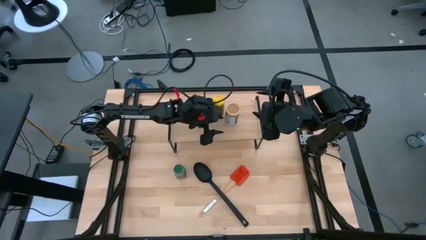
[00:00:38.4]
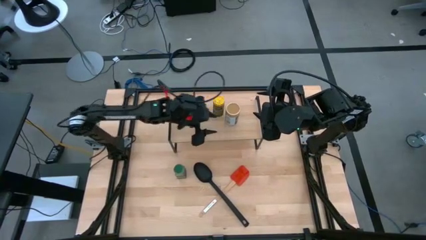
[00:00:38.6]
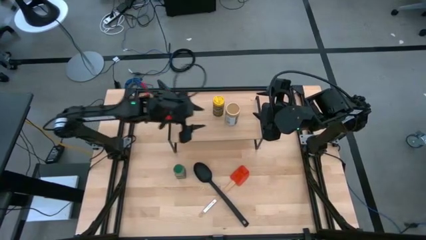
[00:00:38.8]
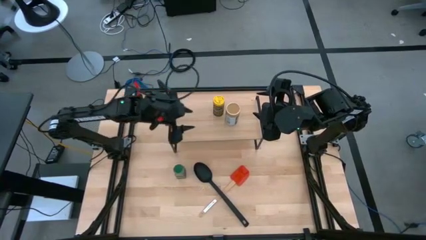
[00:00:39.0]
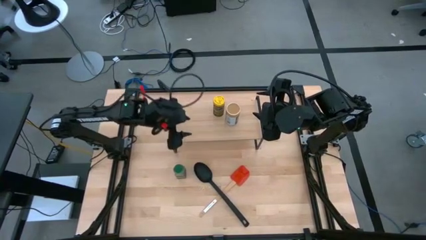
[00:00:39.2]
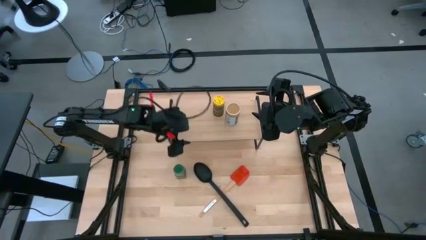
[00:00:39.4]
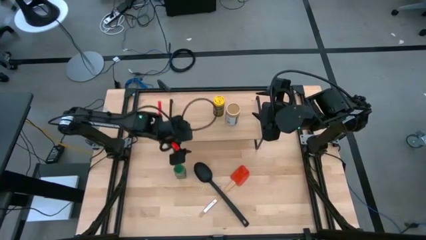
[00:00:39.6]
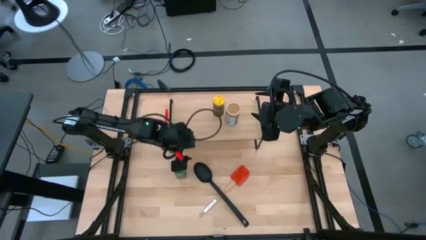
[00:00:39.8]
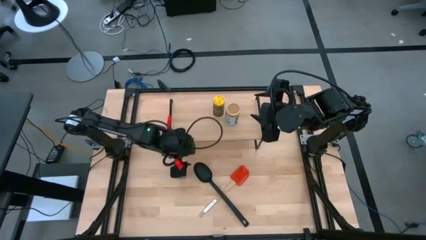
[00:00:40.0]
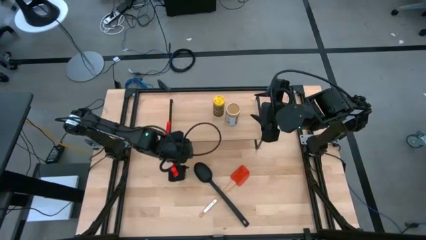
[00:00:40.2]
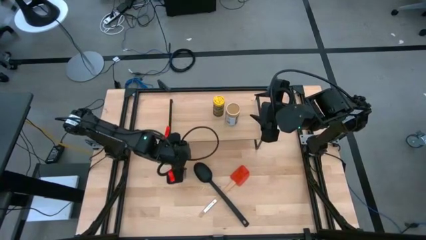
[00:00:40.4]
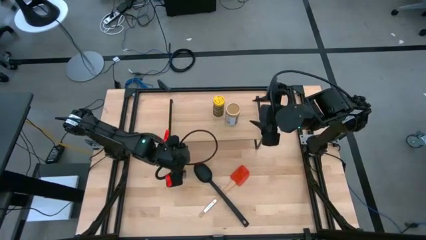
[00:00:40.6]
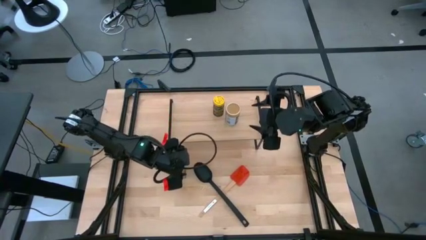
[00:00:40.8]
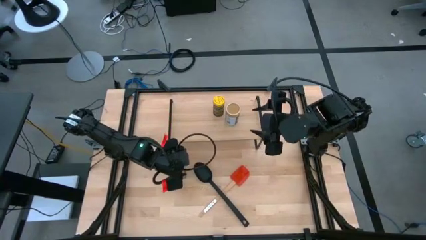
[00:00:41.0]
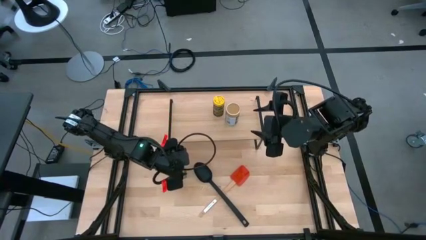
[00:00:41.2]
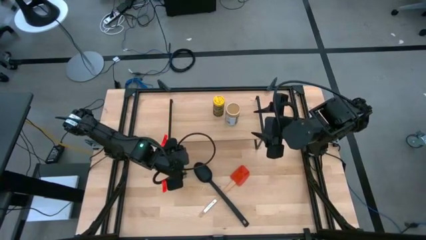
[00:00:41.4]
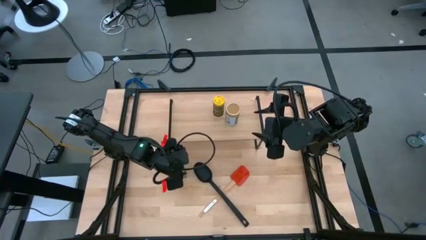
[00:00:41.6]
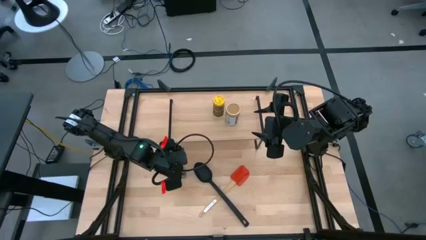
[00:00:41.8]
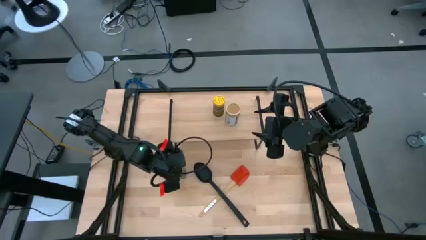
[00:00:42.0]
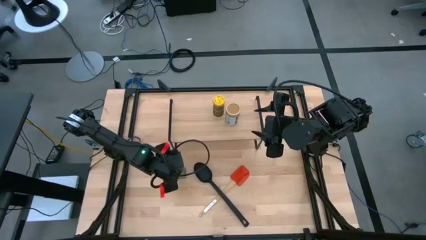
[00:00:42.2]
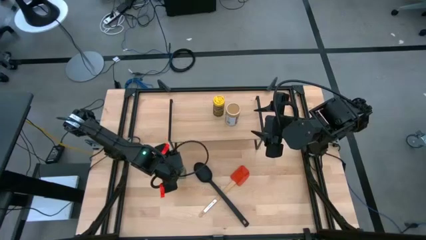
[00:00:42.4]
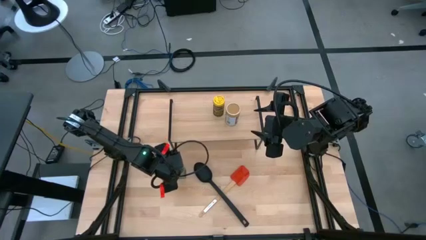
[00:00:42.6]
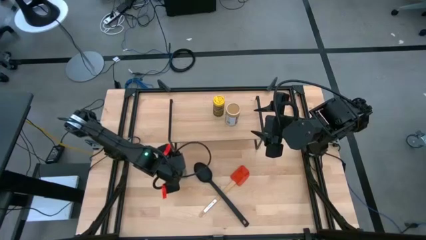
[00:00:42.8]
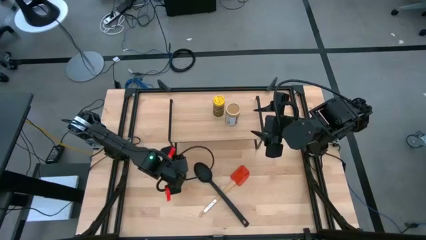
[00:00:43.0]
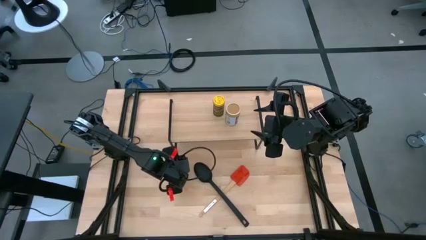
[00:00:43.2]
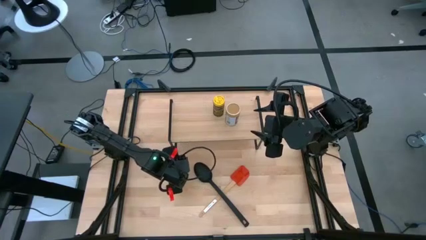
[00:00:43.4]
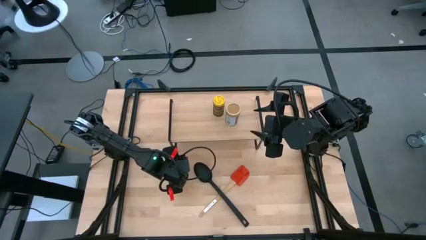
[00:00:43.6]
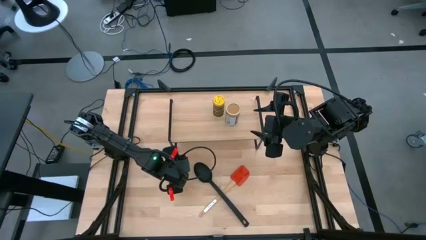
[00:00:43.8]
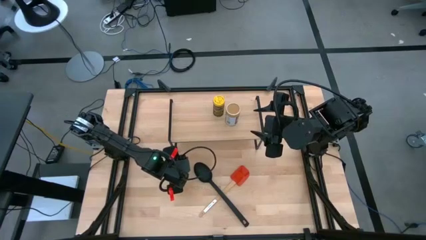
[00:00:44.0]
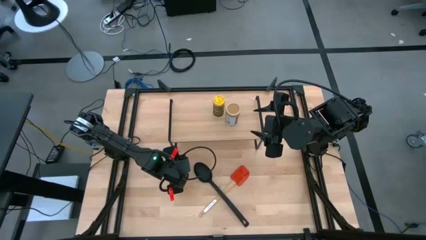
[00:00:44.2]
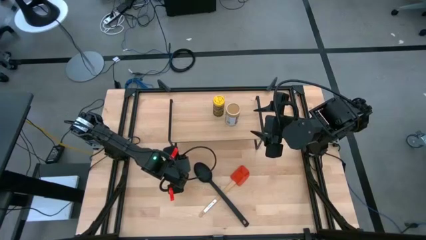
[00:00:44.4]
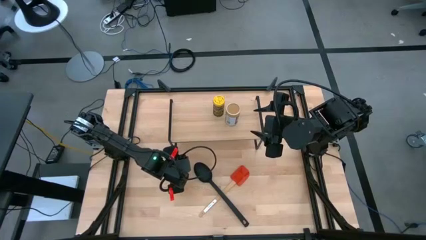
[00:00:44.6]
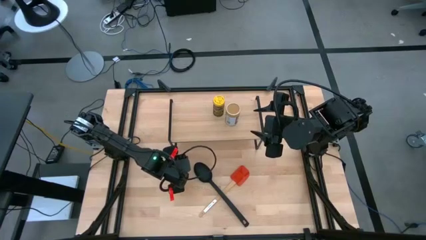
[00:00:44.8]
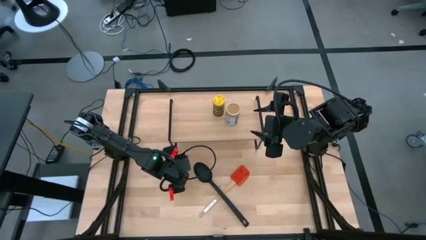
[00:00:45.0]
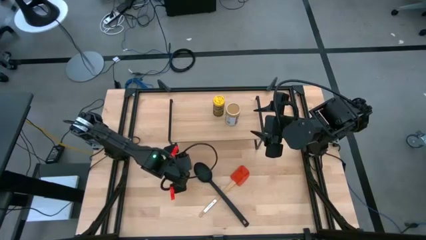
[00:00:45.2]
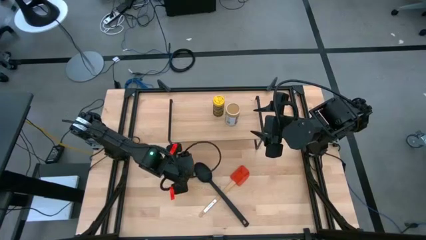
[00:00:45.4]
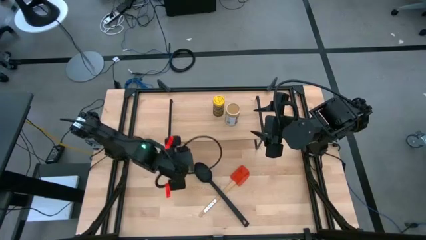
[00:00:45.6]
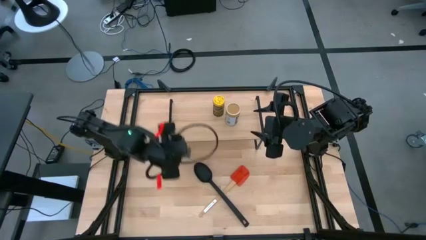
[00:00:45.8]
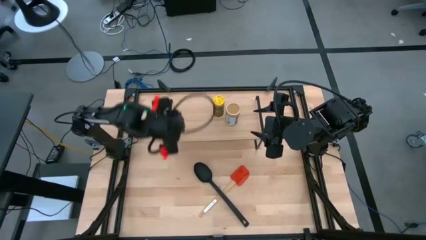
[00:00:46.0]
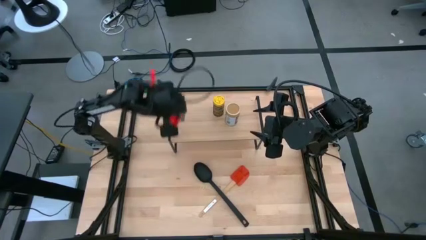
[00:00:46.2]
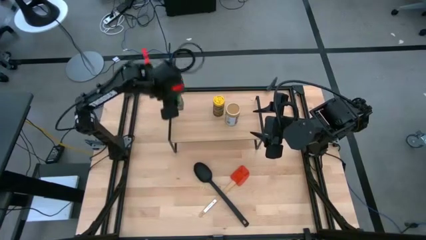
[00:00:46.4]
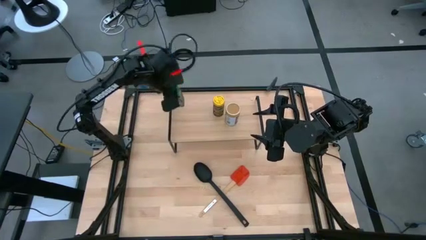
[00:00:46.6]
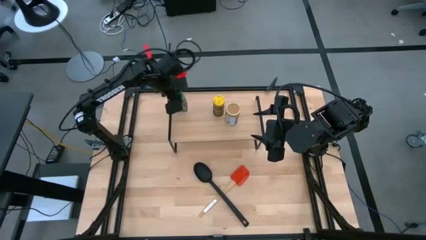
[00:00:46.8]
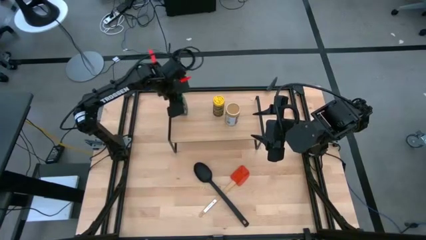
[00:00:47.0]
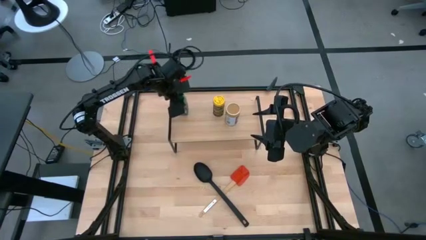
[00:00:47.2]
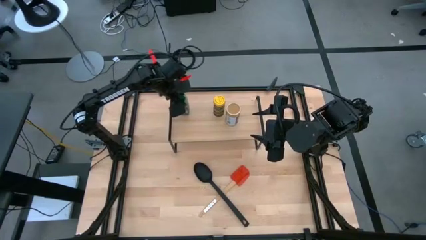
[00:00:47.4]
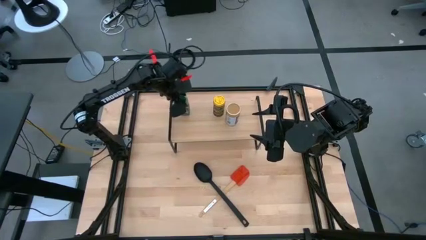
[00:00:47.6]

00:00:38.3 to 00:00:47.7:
Task: Shelf spices
Put the green seasoning bottle on the shelf
